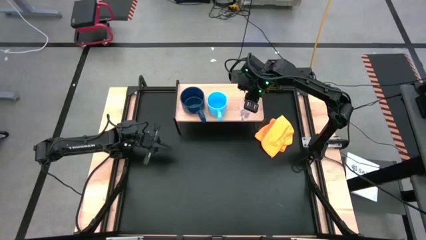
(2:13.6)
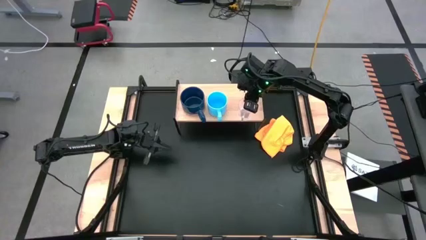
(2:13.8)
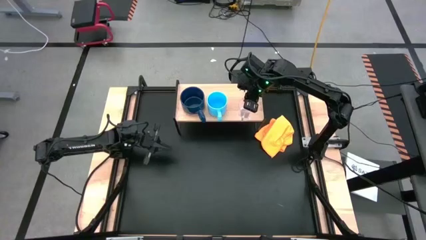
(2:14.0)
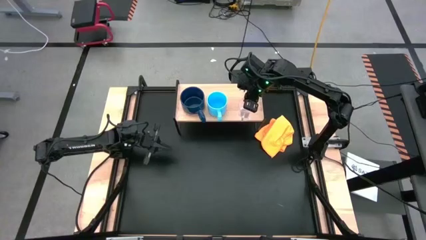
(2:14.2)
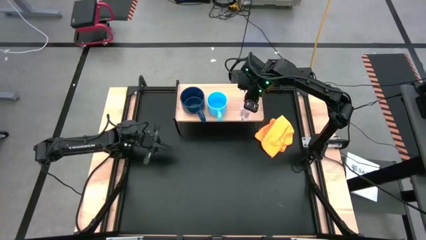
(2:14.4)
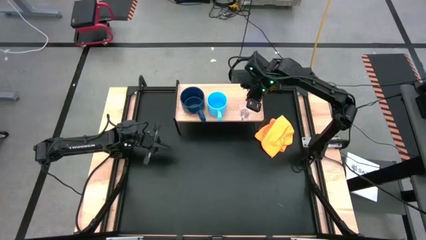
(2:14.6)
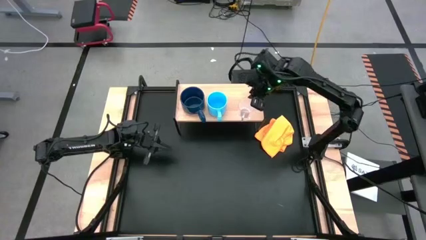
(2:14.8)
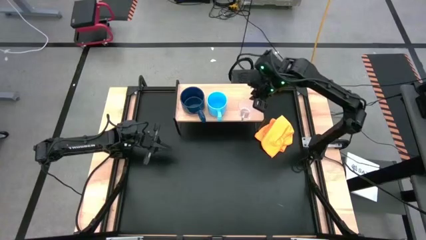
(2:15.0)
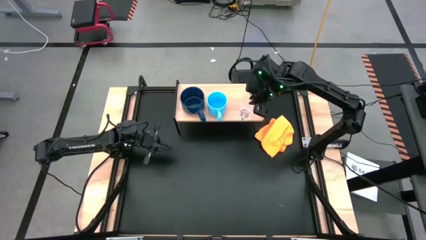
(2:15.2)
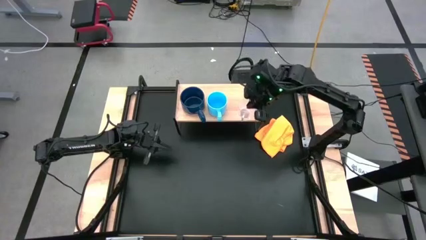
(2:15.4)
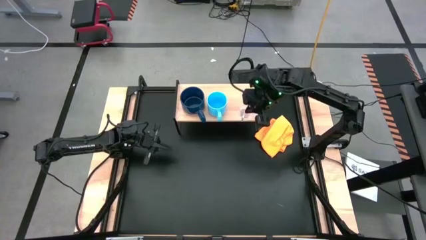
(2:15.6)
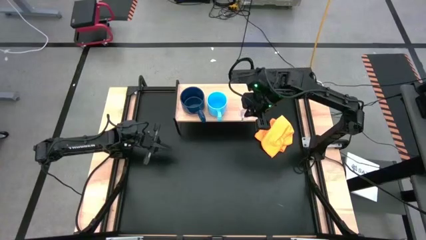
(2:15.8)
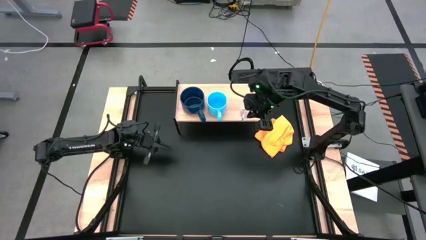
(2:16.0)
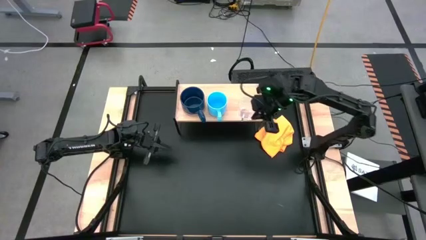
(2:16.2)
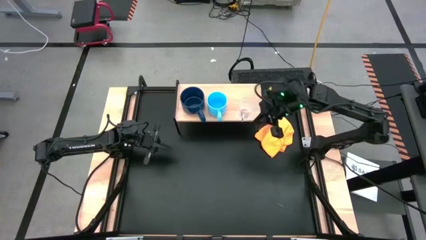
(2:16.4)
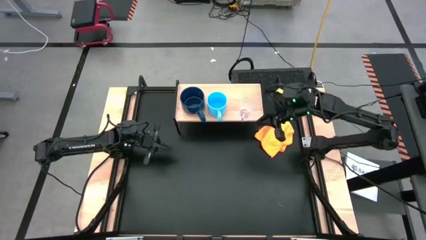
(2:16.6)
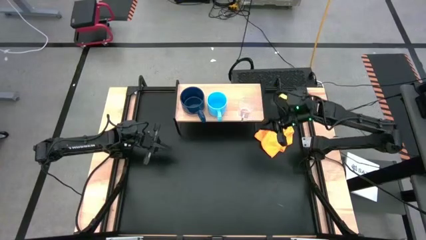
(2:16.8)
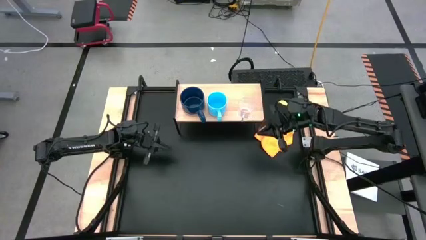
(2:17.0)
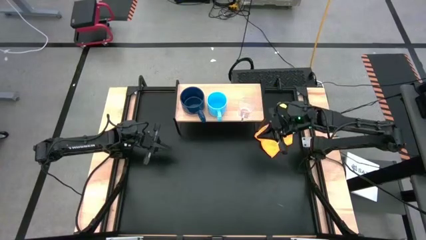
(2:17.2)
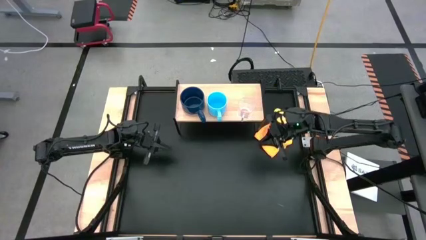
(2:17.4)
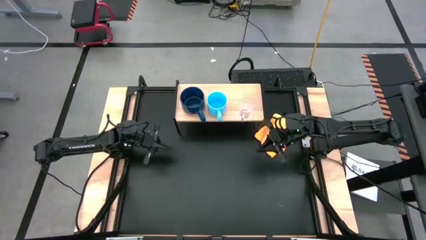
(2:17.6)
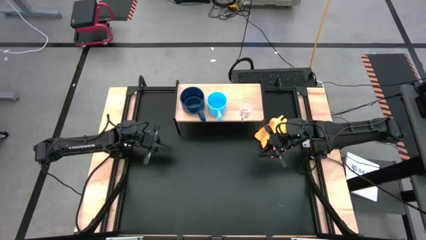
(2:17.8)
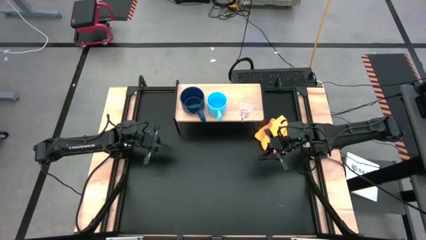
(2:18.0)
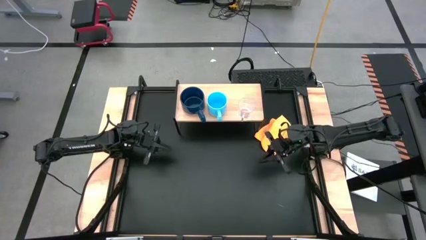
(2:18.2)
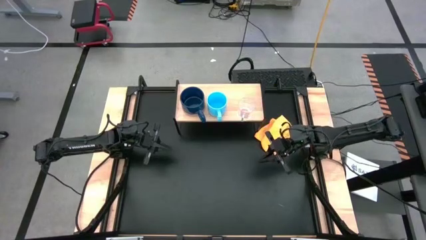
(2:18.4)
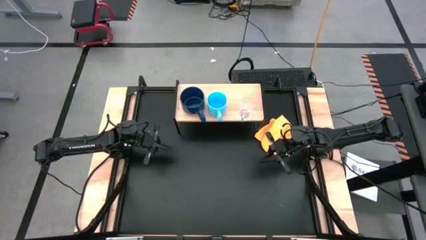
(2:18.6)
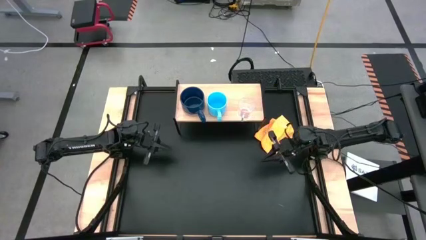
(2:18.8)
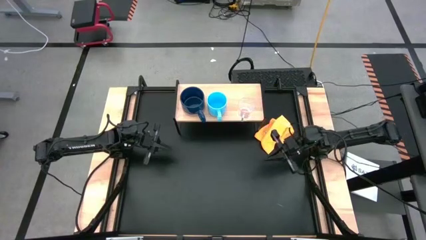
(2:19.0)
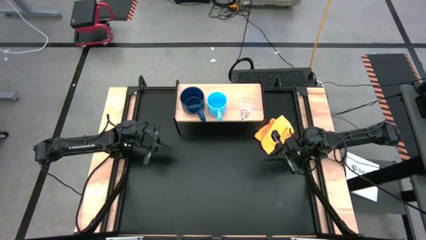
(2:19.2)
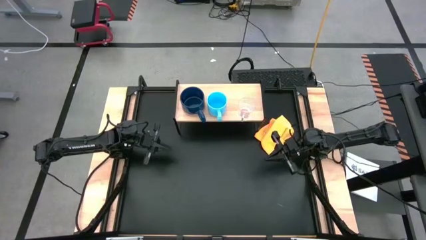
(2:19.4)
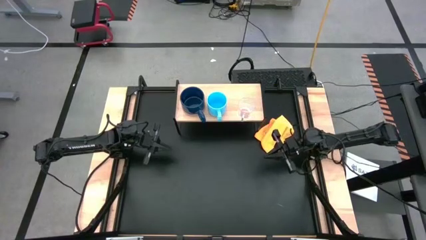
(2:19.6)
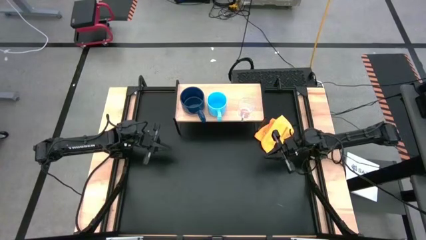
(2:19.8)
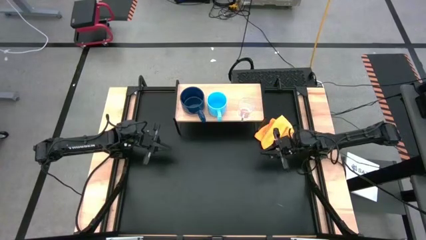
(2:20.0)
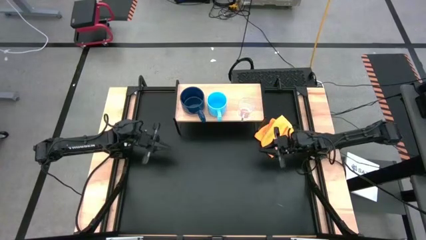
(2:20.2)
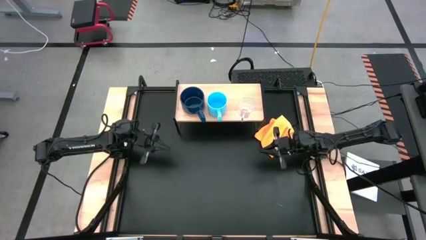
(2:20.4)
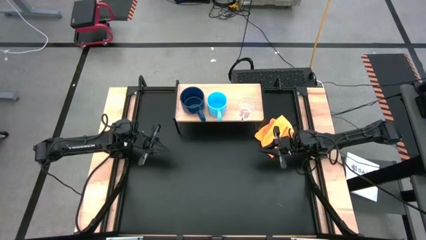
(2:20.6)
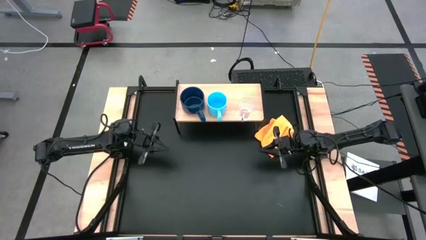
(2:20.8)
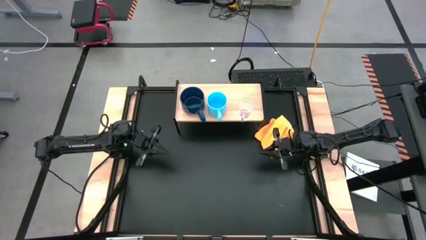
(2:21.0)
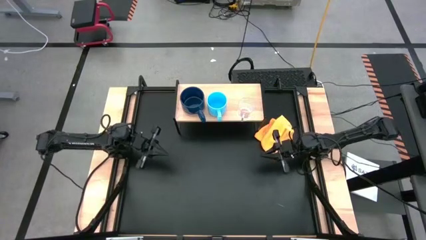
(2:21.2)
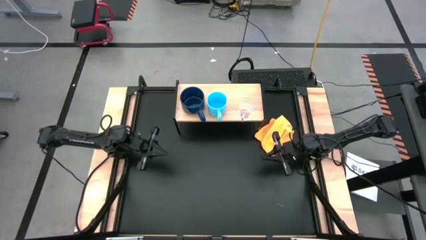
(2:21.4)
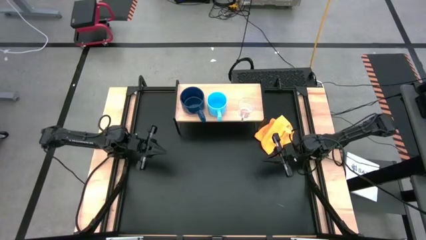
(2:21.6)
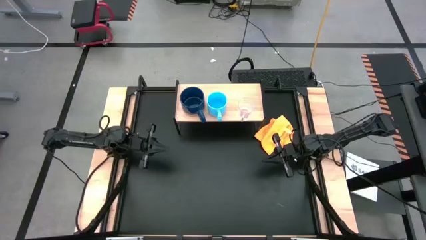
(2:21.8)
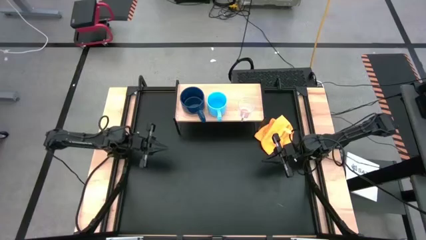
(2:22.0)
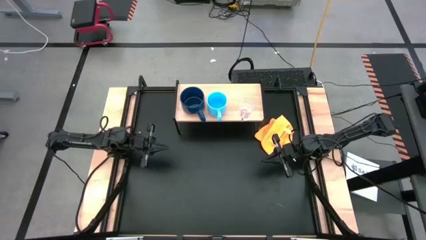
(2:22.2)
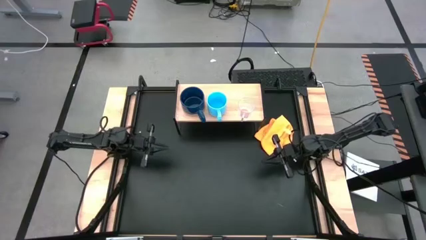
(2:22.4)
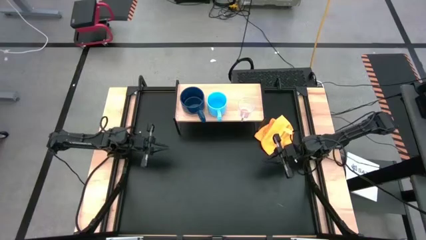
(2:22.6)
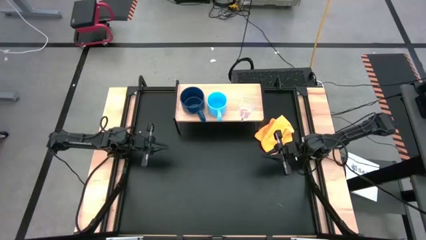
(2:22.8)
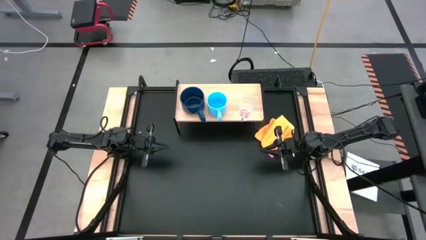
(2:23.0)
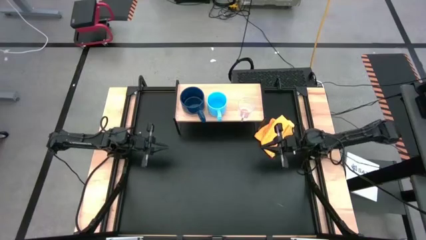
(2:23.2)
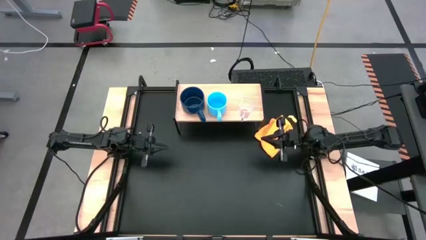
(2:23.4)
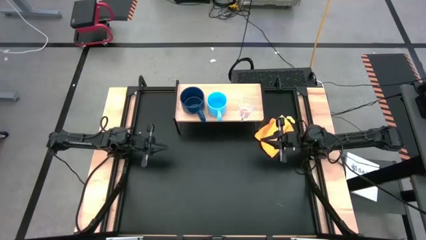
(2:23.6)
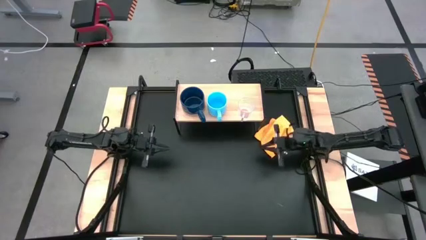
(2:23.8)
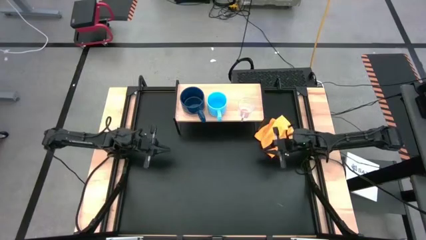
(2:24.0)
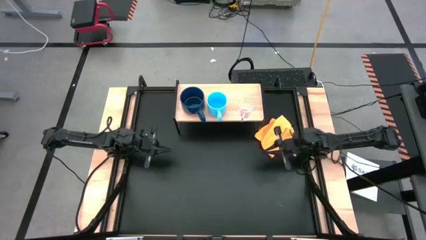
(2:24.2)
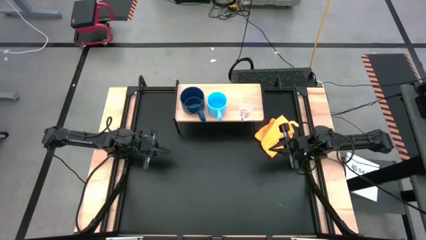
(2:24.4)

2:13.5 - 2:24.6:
Task: Stack small to large cups/mugs on shelf
Return to Home Position

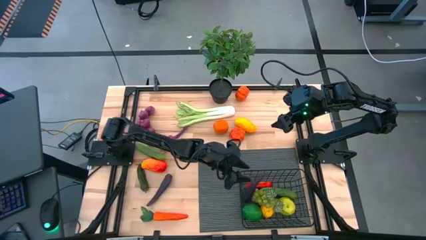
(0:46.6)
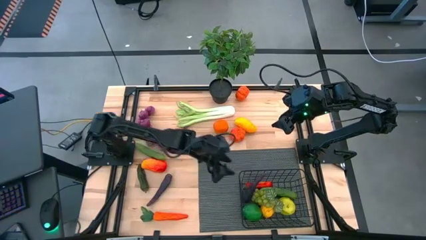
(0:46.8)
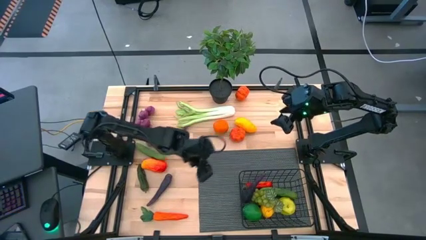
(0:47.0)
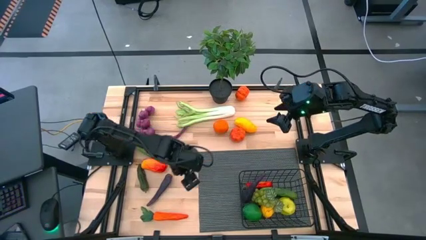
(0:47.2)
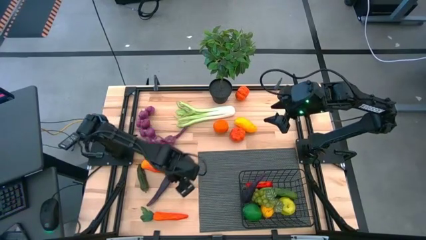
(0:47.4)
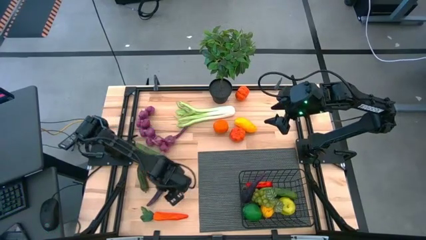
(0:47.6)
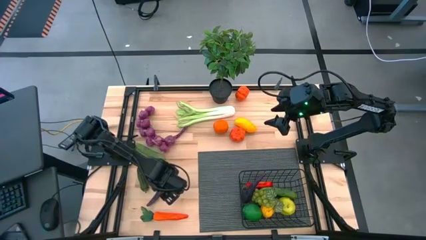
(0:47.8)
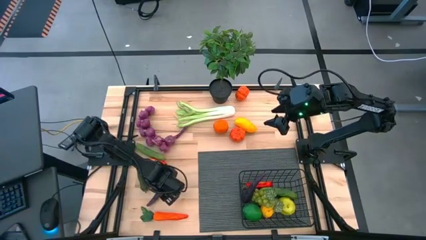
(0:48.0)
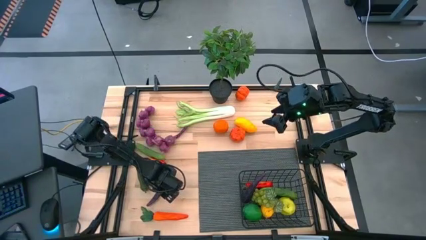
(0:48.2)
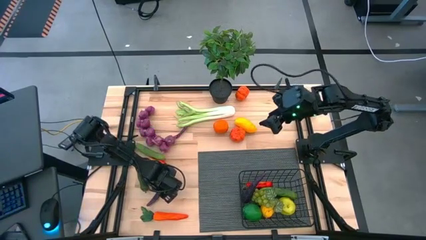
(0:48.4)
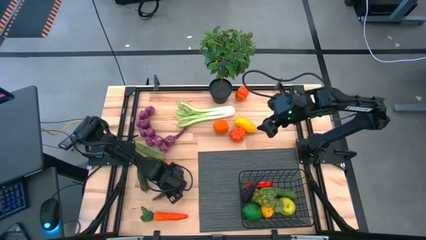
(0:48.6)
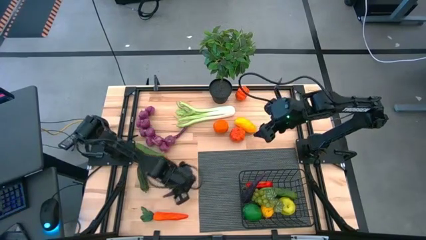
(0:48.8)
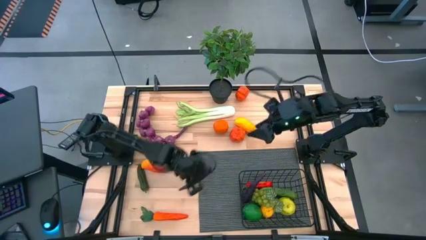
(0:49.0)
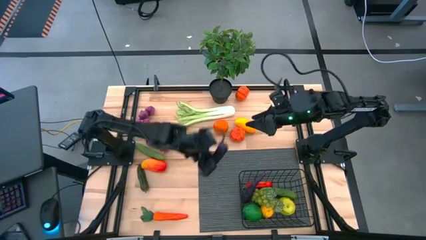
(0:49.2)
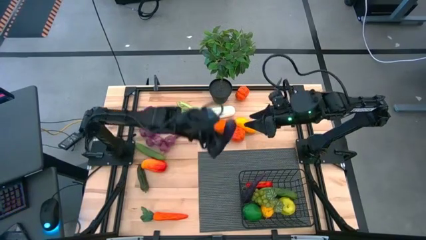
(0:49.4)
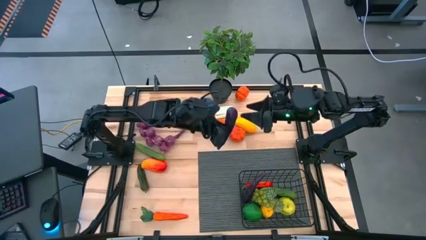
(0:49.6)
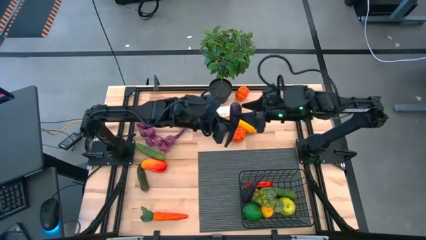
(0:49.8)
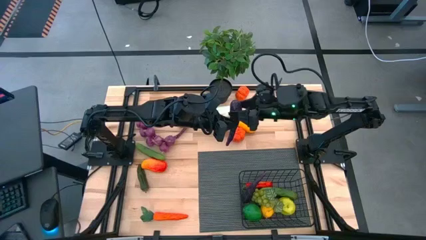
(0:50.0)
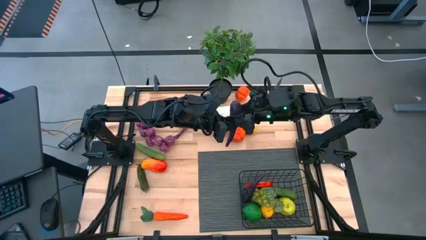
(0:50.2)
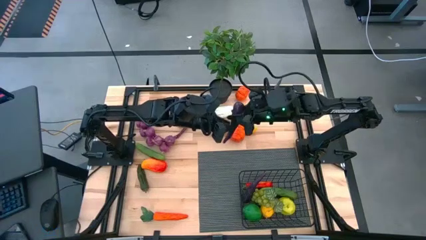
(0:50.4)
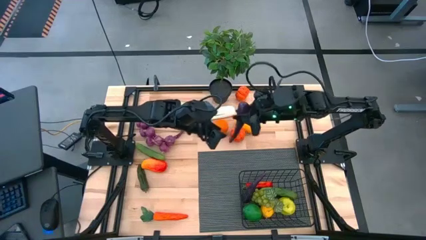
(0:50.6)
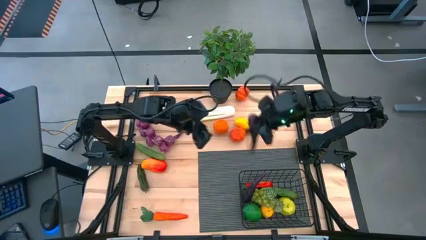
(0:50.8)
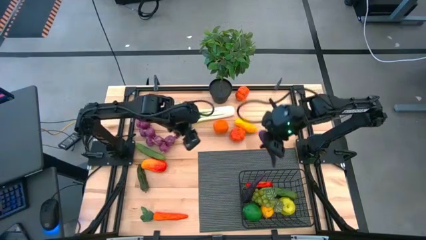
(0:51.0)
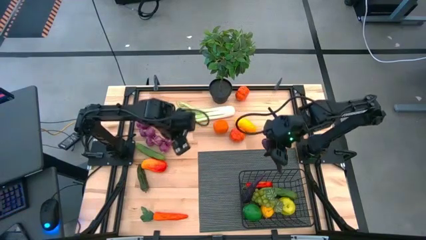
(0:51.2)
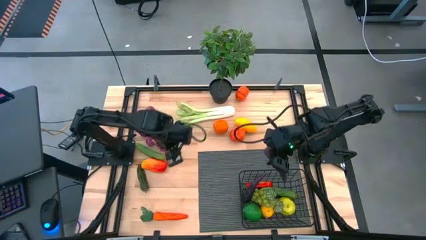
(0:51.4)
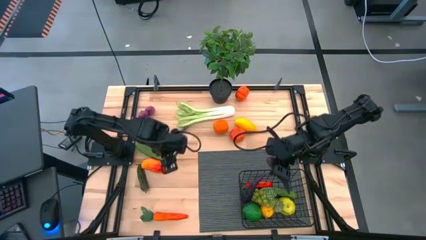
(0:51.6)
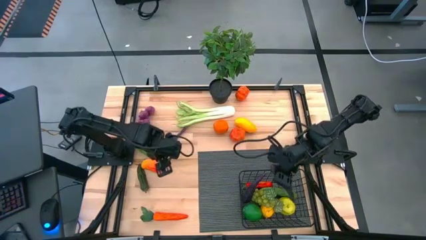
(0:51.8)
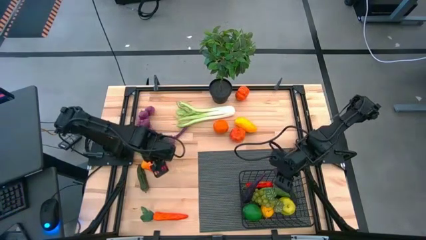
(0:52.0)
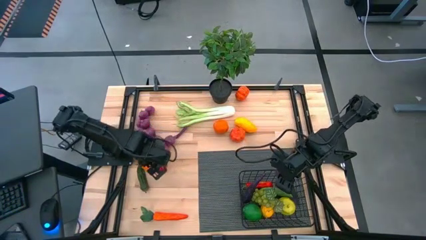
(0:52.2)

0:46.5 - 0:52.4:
Task: Build produce basket
Put the purple eggplant into the black wire basket
